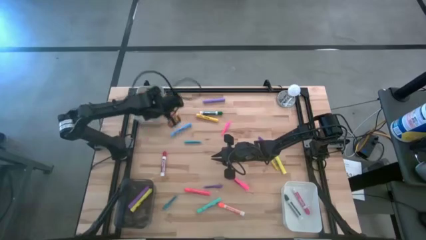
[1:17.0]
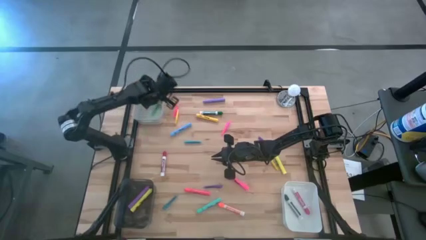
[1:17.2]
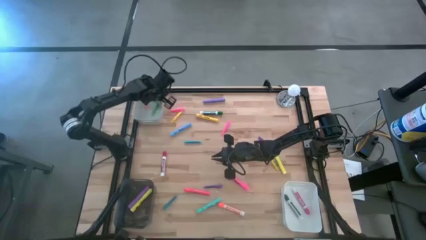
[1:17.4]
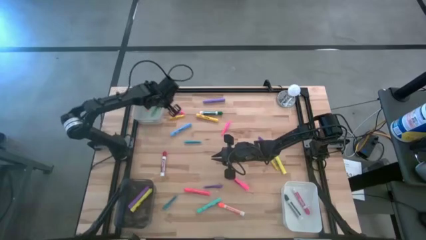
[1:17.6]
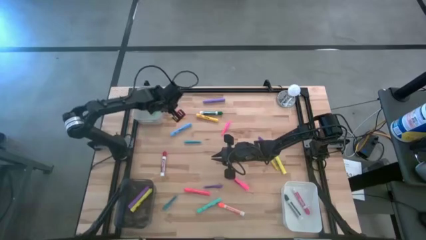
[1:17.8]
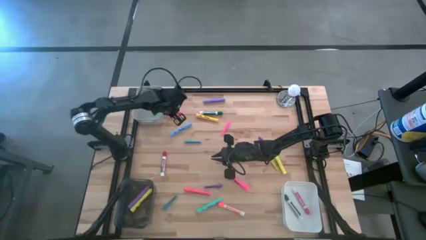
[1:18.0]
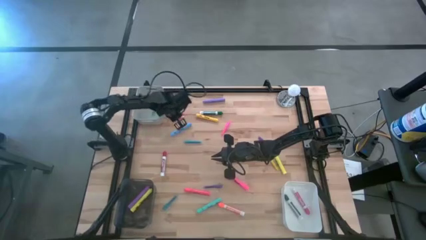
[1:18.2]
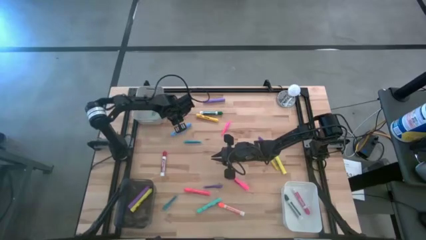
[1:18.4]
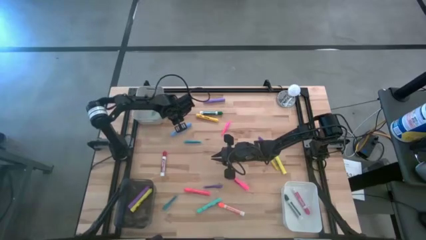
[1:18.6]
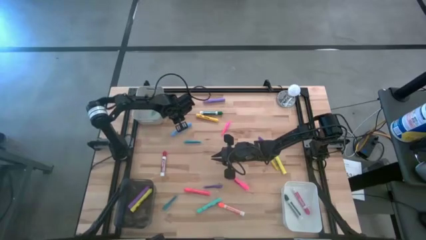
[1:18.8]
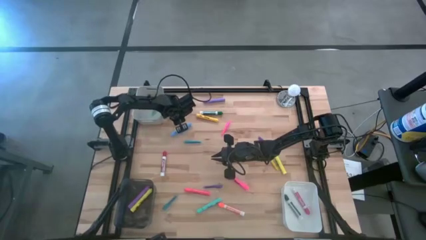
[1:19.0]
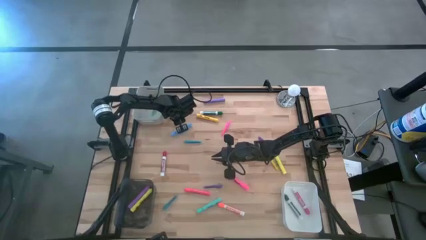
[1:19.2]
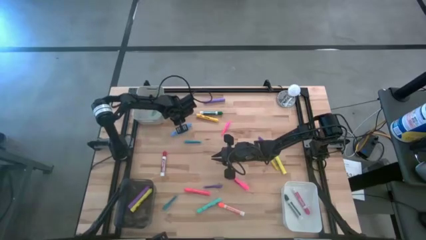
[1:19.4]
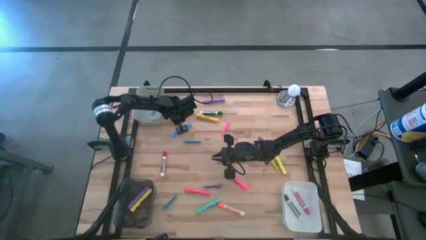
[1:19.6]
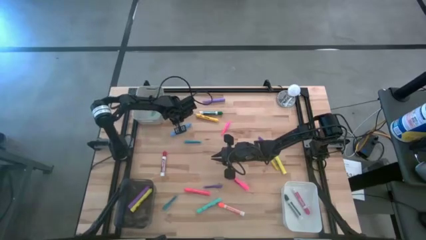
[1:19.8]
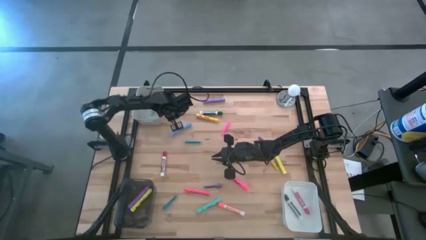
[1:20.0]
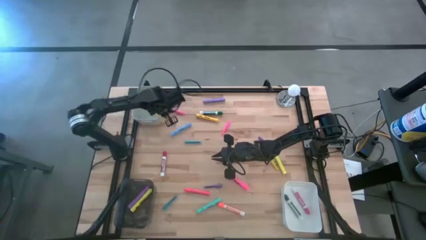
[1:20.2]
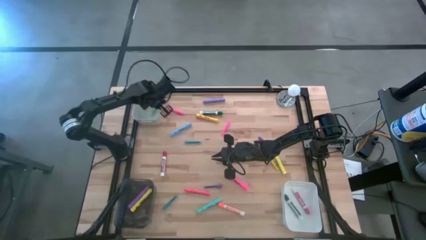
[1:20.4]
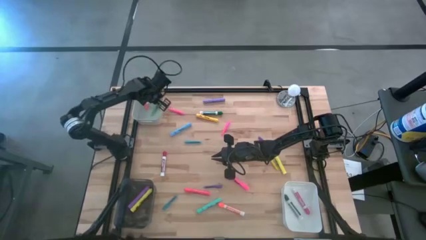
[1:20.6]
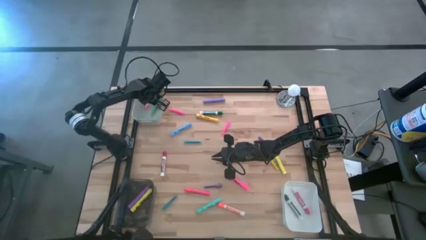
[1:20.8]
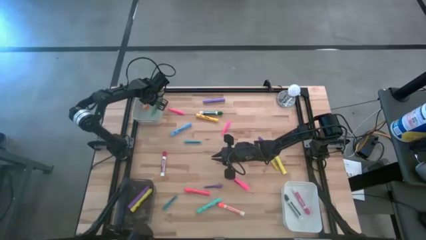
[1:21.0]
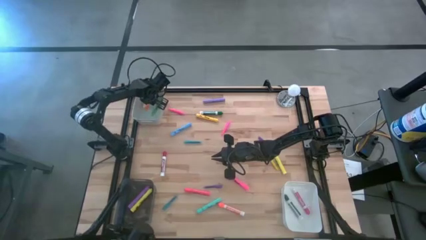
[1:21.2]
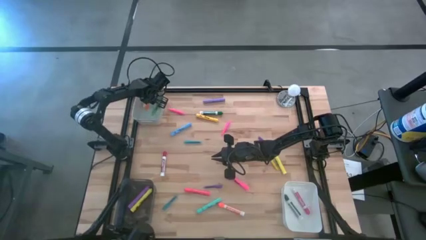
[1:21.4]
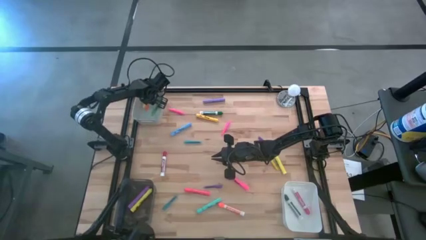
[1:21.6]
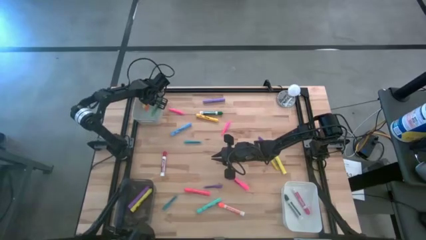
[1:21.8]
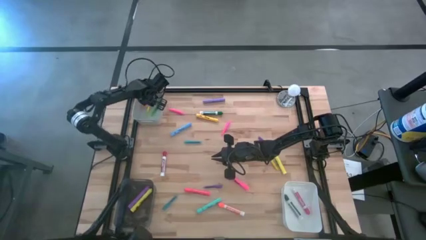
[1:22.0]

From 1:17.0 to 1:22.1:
Task: Pick & Place Markers
Put the left yellow pen into the gray bin

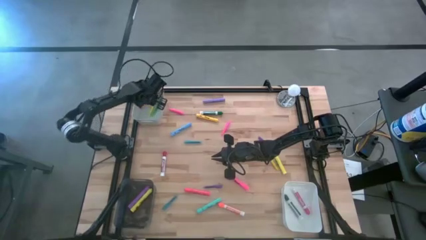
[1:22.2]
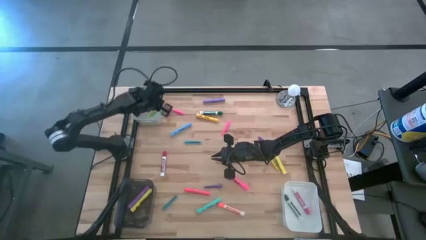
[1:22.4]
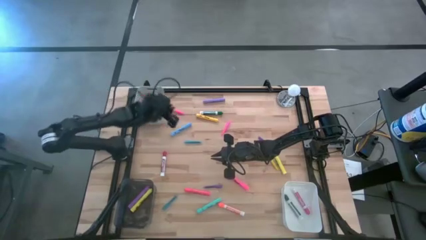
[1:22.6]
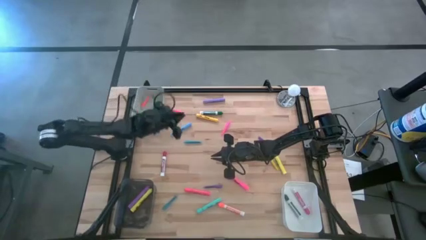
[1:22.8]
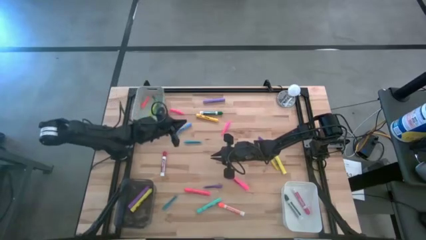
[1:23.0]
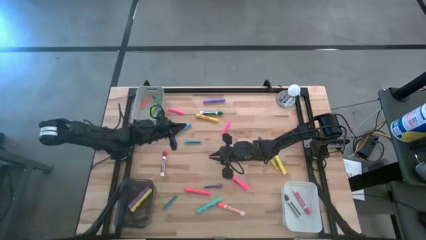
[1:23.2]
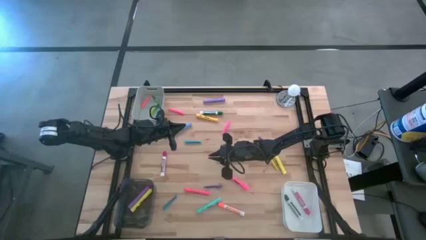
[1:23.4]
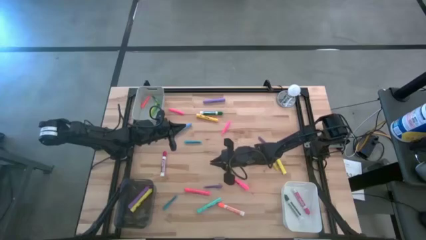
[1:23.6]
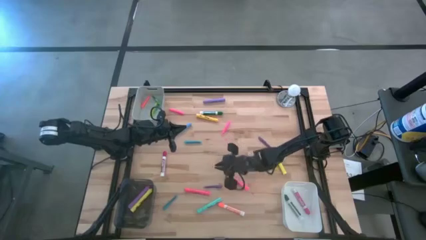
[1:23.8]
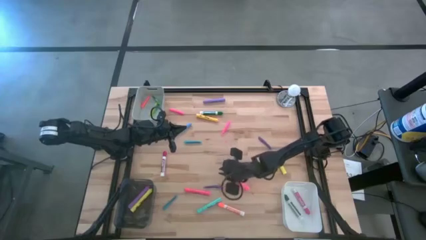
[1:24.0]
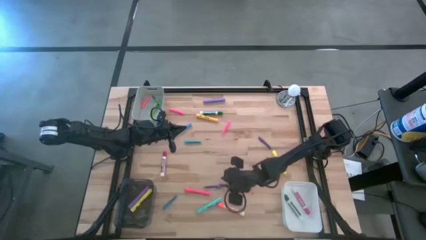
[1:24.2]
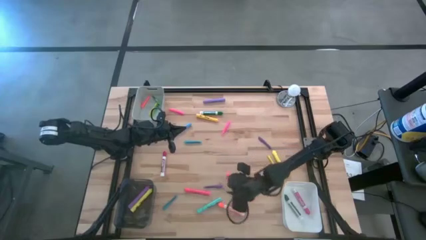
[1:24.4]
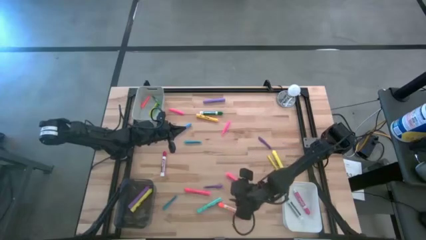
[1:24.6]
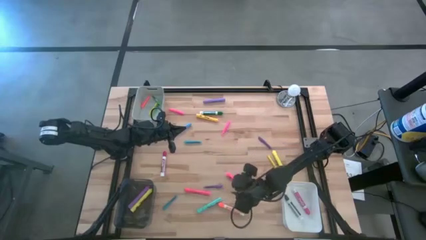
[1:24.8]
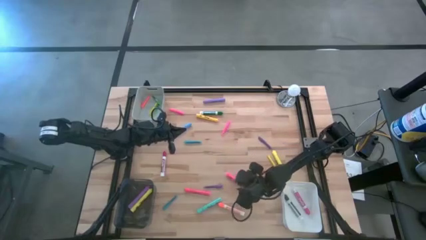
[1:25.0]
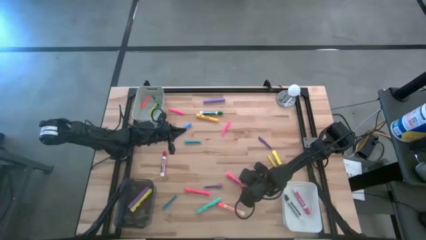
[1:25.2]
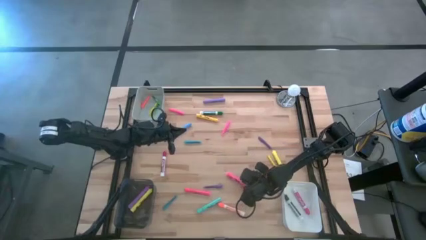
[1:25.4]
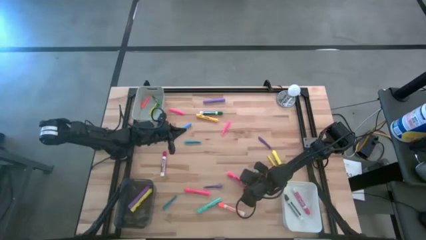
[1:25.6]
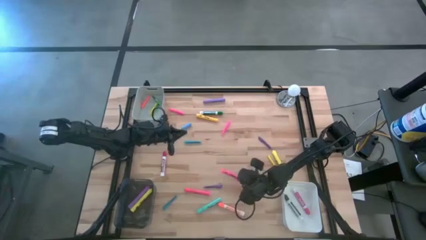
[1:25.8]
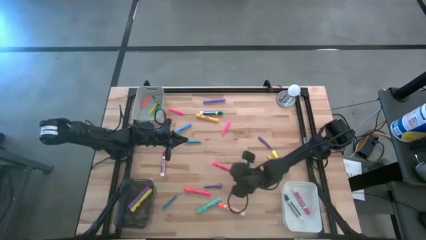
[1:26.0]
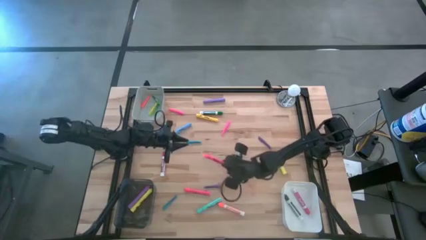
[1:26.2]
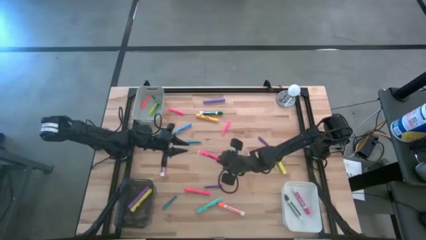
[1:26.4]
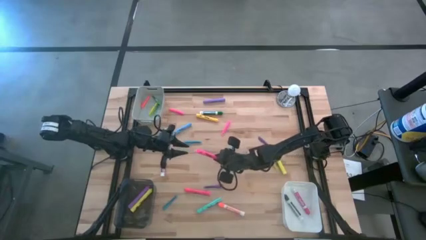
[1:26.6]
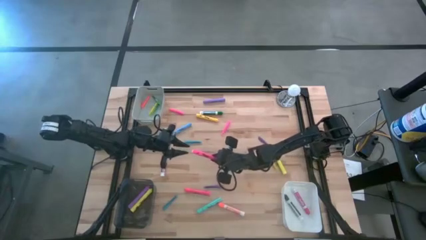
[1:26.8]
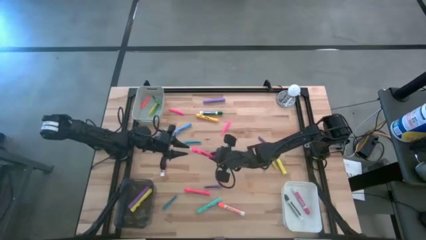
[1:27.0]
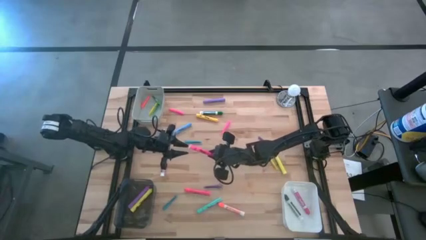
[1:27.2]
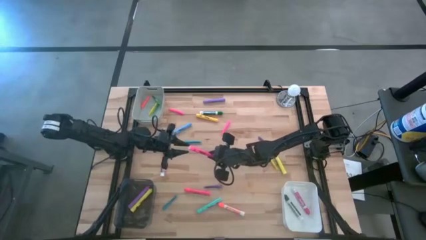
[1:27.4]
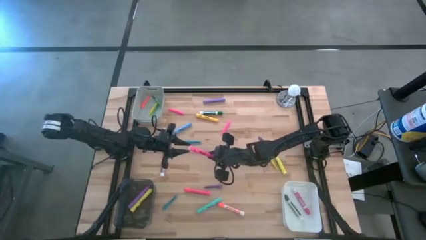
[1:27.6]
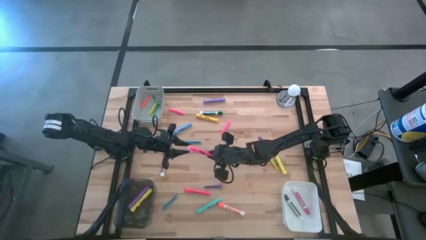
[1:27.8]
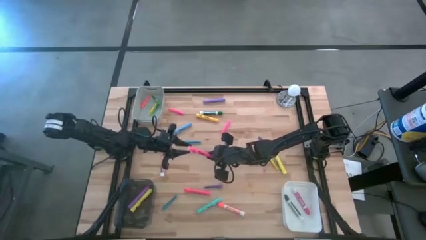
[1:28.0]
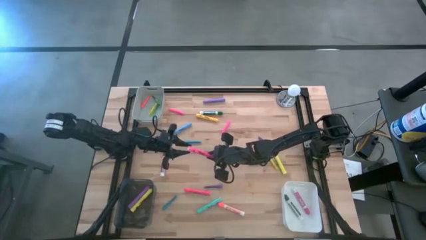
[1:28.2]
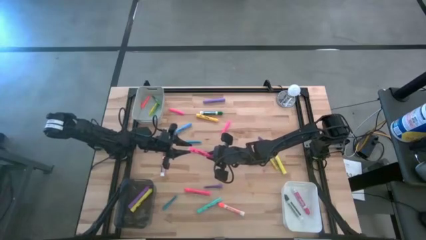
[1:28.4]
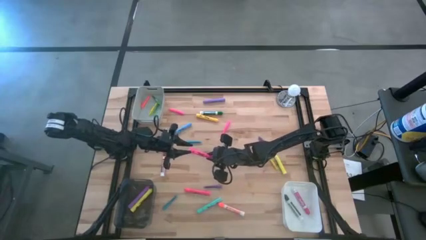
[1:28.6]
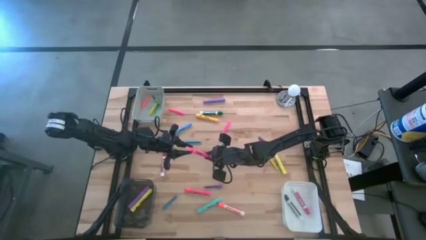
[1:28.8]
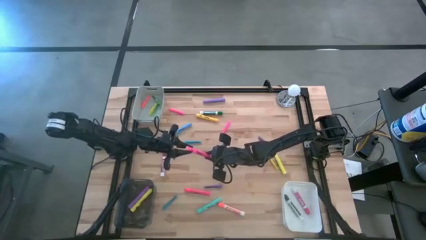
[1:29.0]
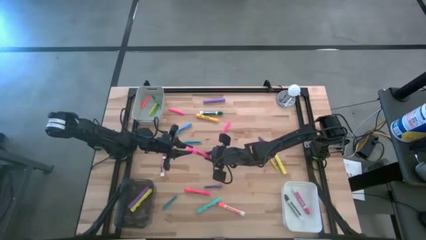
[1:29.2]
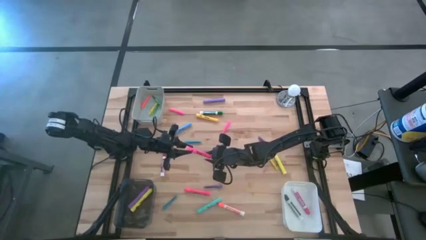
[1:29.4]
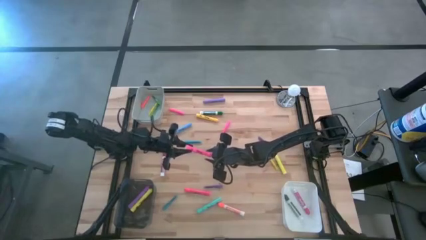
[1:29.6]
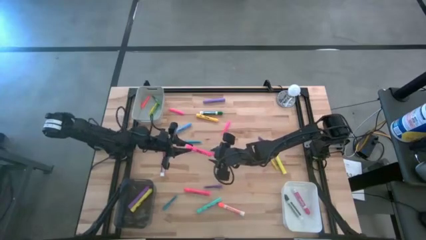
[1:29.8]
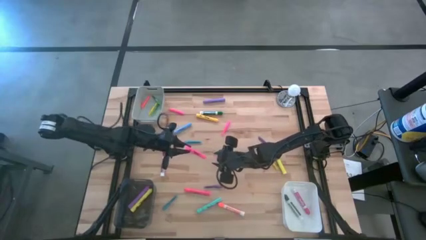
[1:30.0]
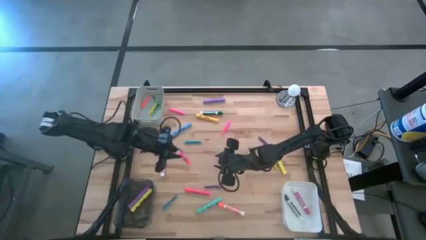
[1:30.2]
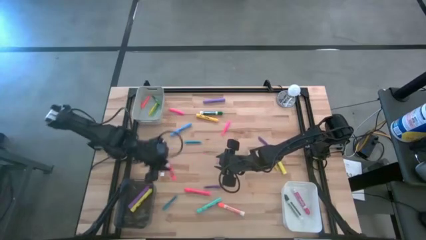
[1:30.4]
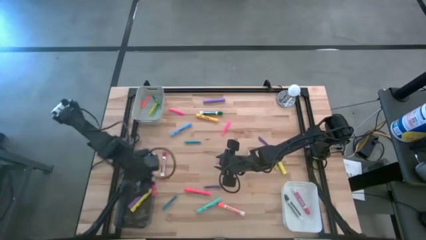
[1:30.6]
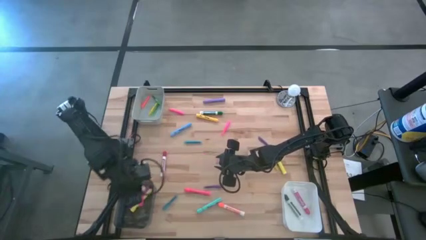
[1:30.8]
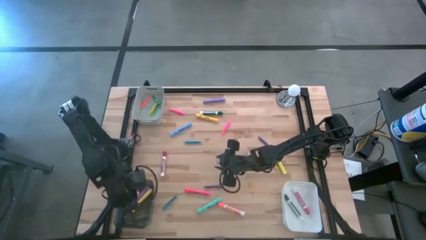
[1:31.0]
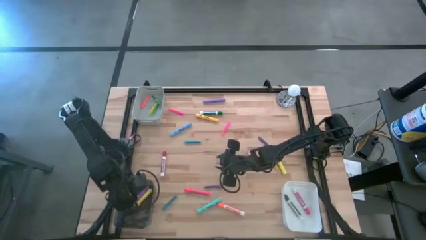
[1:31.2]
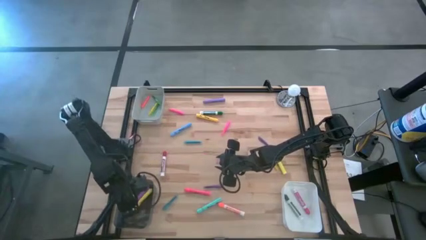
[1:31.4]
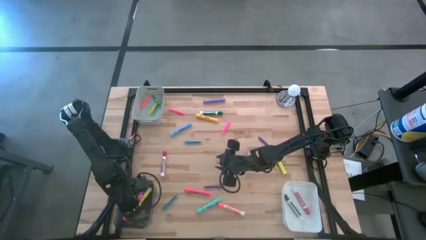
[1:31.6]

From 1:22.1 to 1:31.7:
Put the right pink marker pen into the black bin

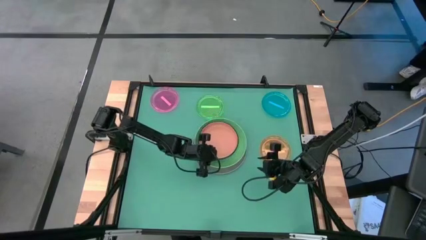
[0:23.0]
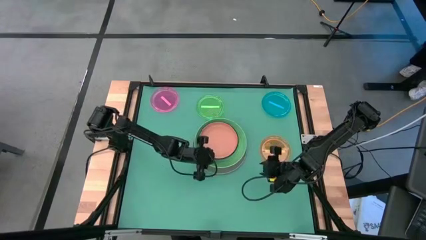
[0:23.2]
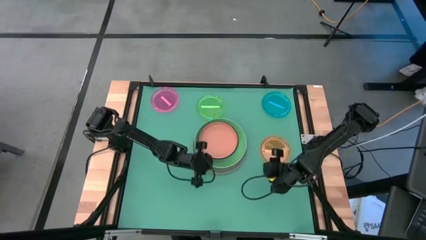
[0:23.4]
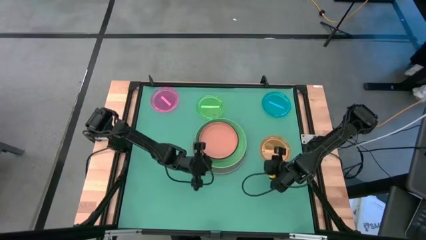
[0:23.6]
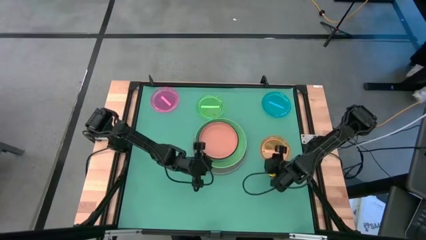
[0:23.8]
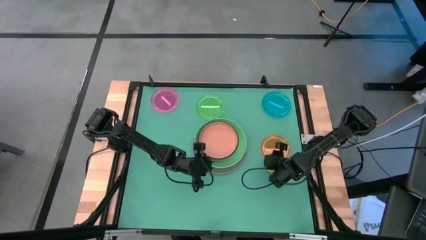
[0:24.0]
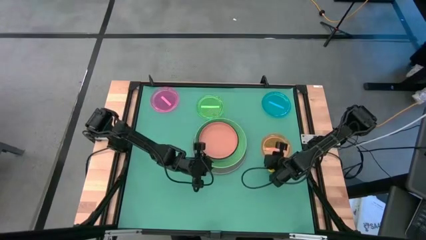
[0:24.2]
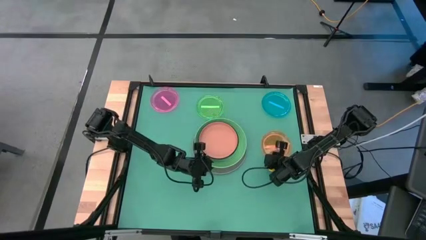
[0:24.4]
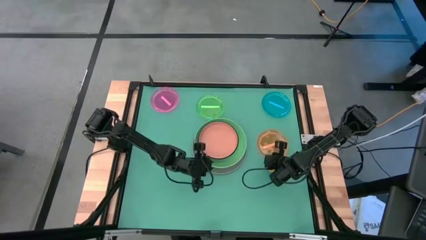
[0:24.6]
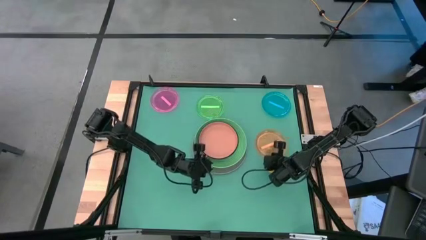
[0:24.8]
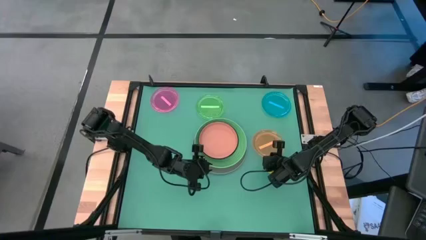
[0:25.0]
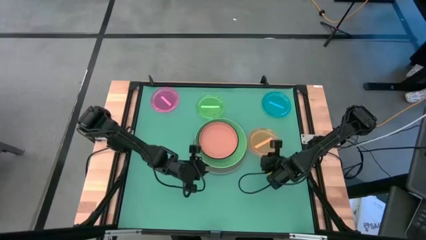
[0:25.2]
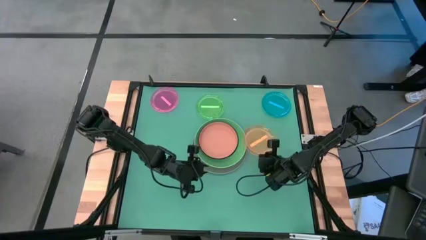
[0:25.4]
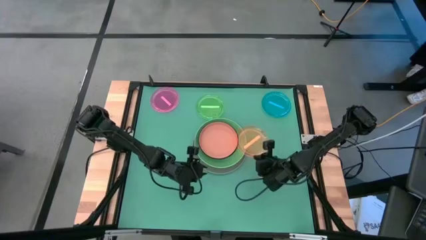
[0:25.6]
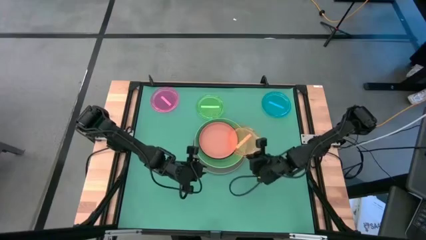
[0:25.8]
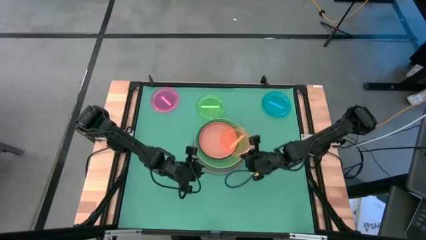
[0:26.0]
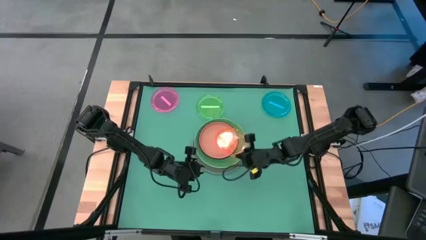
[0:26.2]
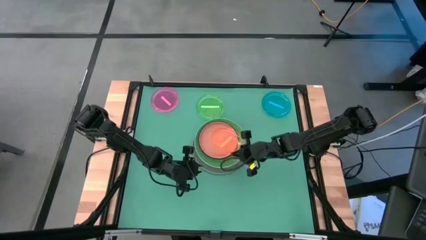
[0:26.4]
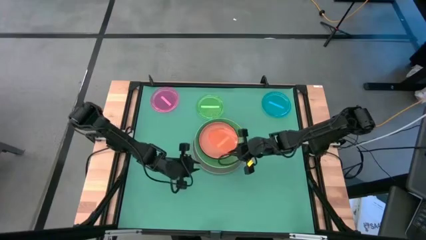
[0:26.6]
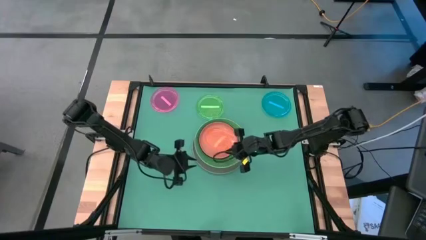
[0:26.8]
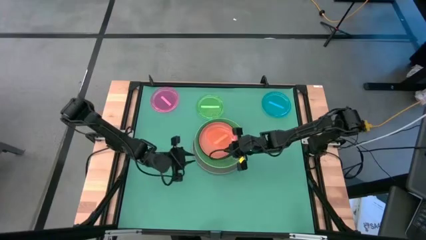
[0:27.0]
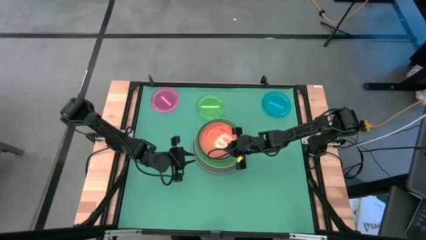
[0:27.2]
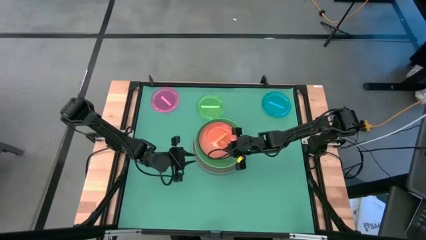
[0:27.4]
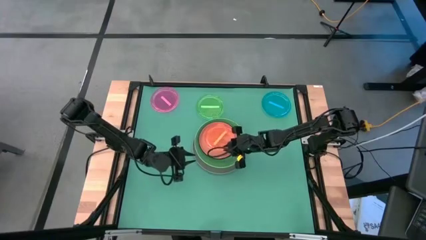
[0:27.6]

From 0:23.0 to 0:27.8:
Task: Stack plastic plates
Stack the orange plate on top of the brown plate
